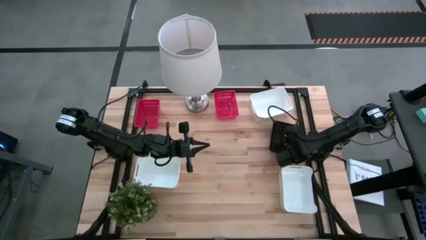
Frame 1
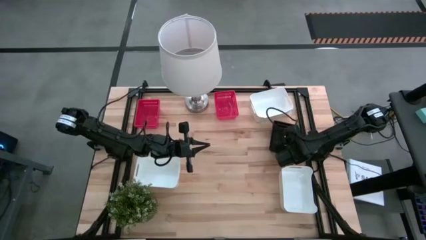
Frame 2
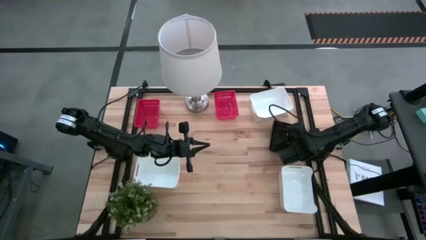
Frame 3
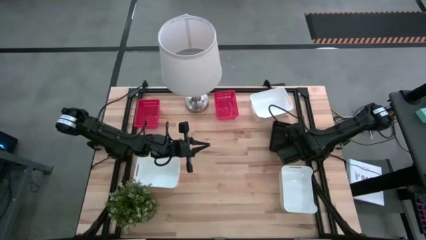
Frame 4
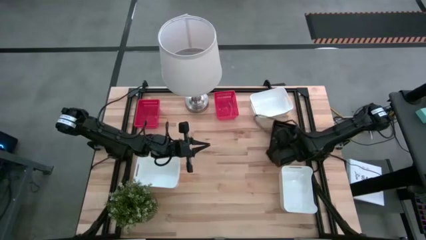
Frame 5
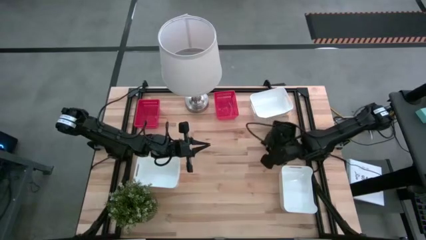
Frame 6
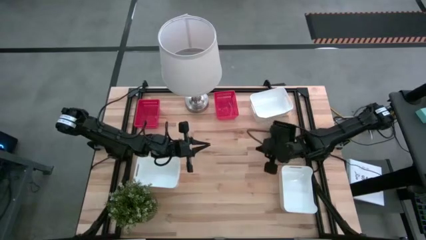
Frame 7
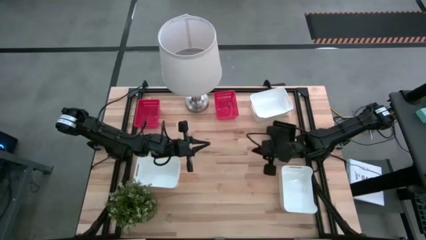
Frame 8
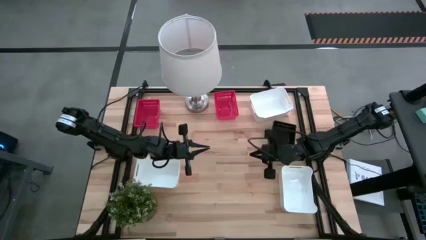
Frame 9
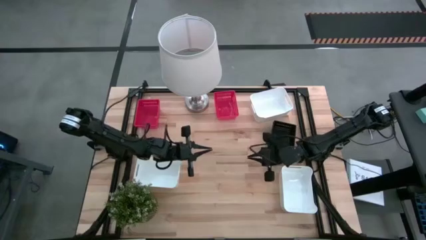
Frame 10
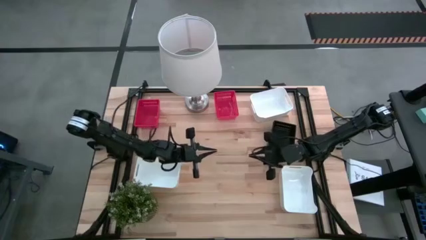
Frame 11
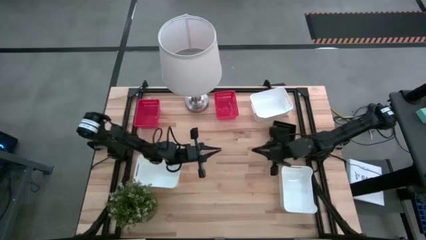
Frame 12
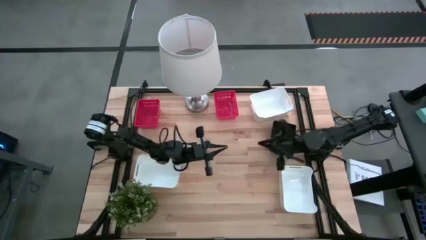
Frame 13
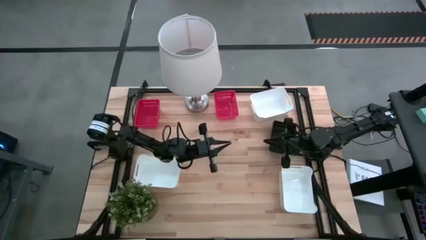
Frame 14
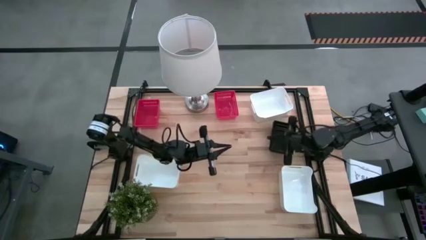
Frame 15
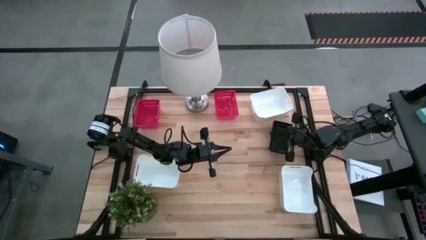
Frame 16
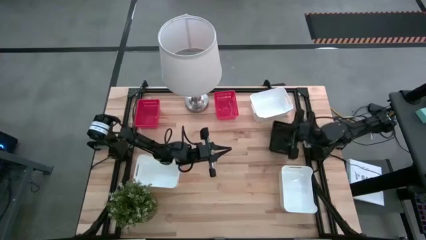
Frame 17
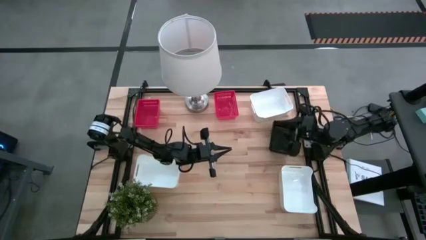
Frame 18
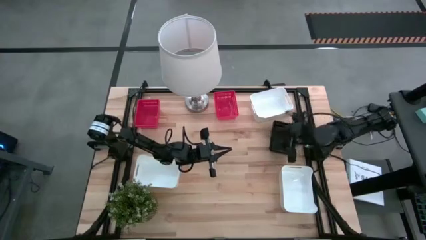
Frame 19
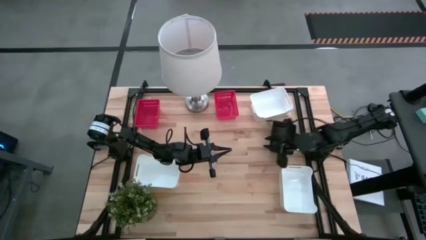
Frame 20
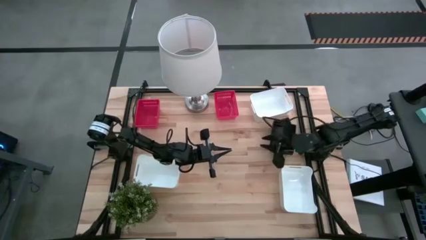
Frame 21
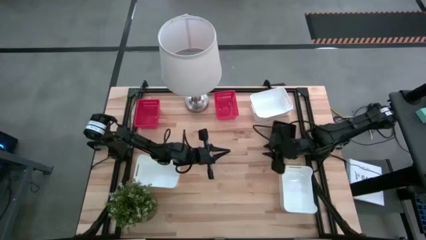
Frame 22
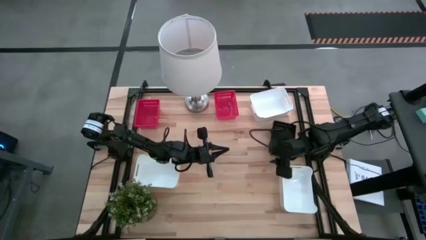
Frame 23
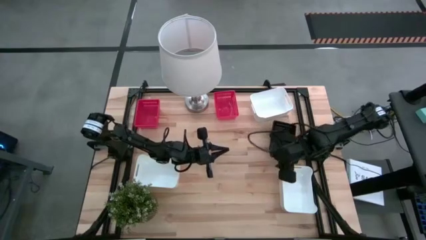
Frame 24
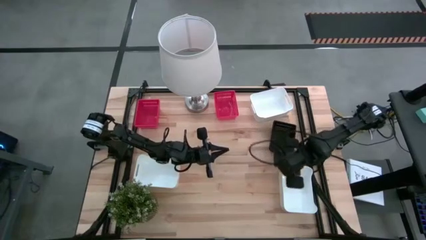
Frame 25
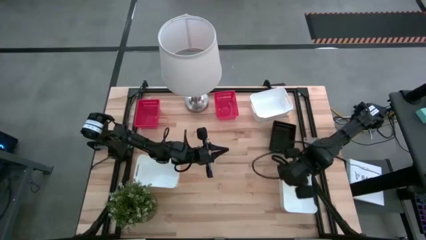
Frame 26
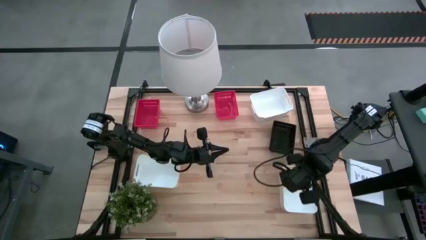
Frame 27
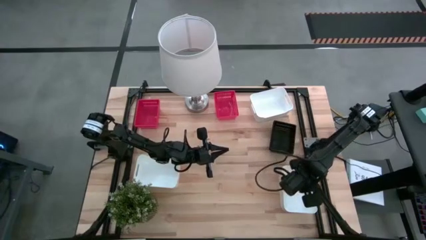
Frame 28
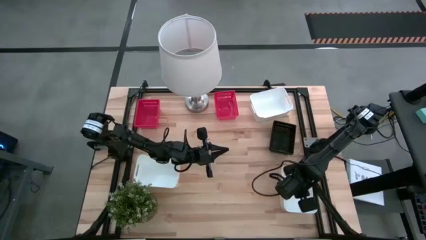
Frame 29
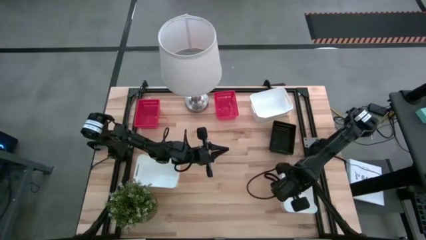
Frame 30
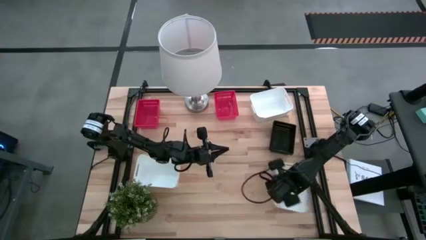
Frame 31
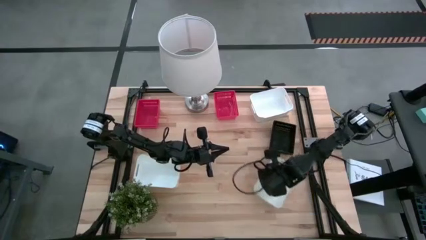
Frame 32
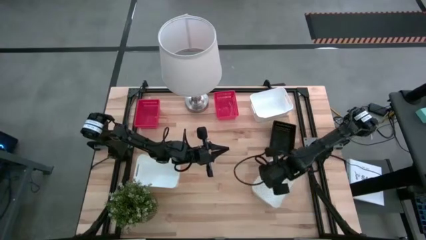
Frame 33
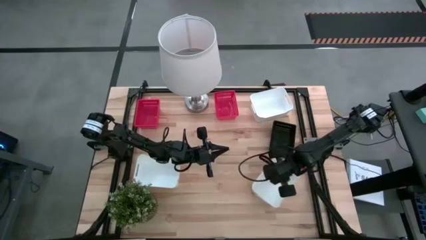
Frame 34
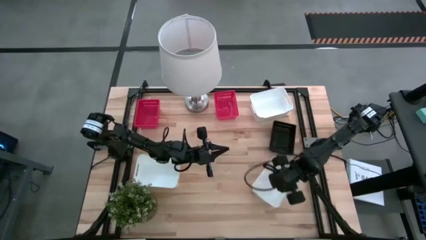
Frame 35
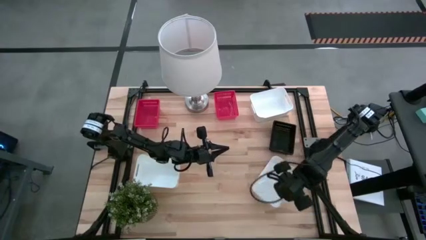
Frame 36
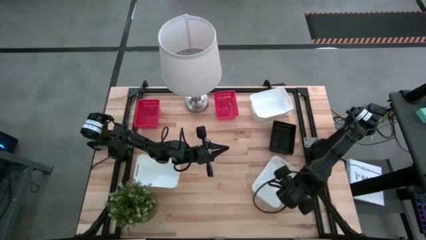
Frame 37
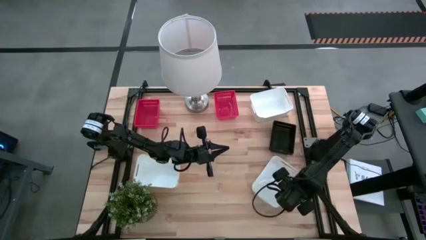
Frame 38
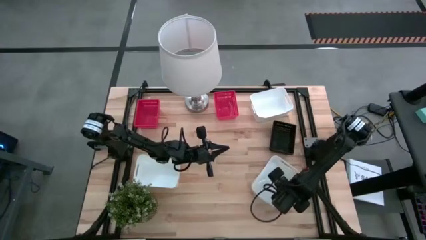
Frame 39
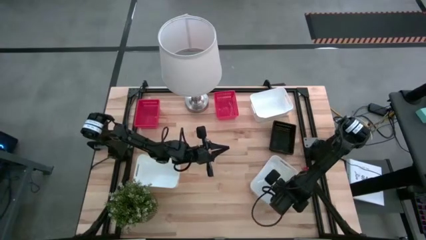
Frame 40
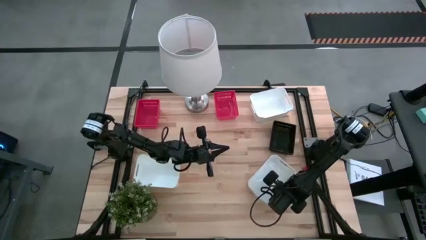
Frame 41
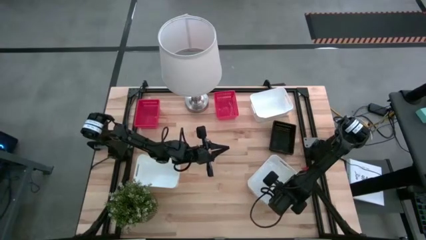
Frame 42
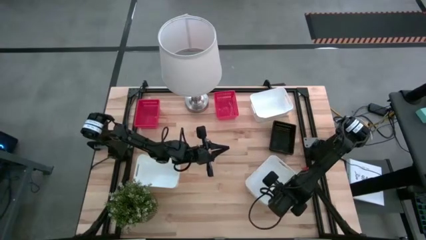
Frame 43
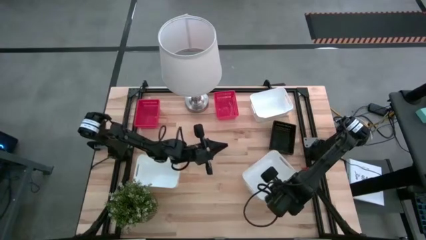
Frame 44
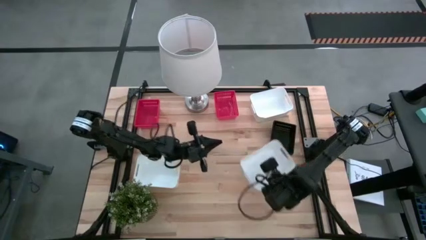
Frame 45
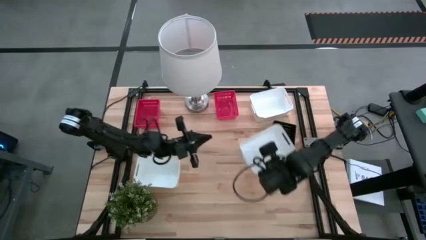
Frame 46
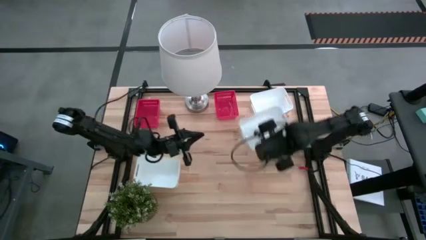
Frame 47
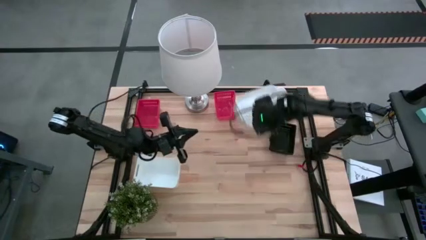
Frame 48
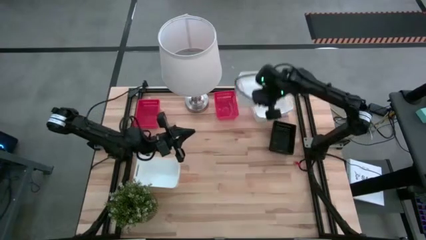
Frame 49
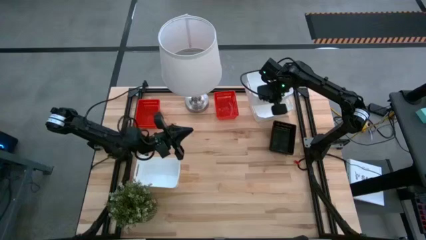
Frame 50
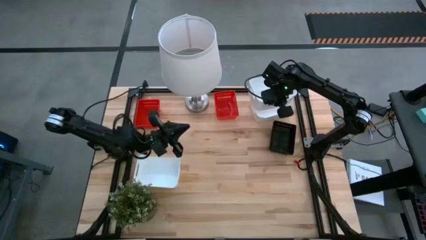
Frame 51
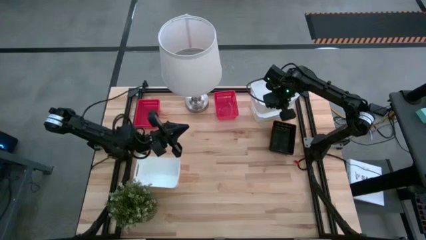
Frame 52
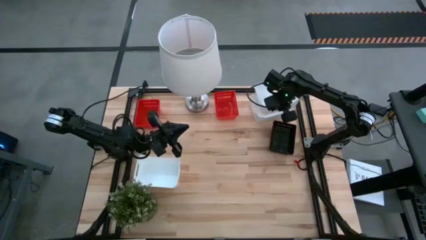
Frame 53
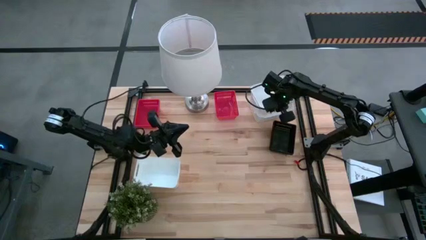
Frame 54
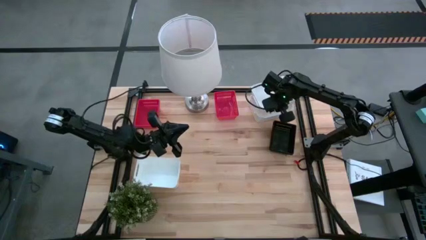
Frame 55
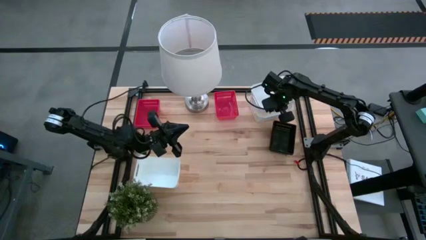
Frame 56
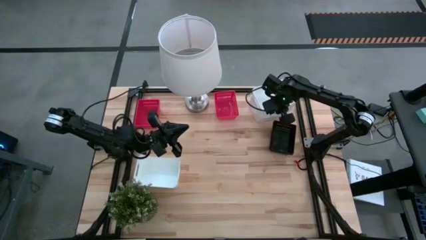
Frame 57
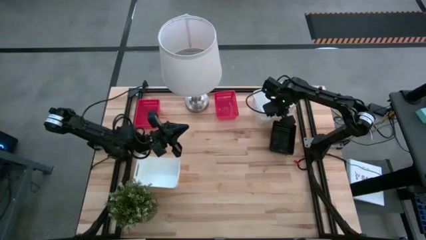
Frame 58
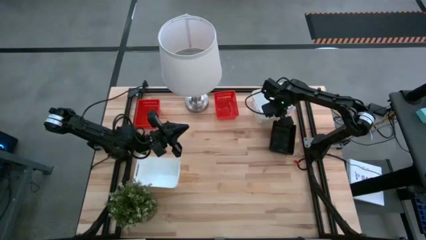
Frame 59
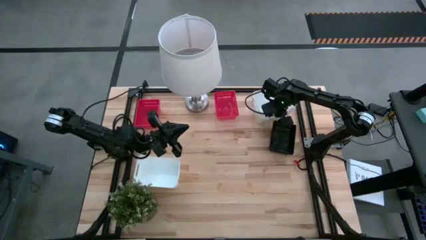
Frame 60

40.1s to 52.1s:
Stack the bottom right and white bin on top of the top white bin

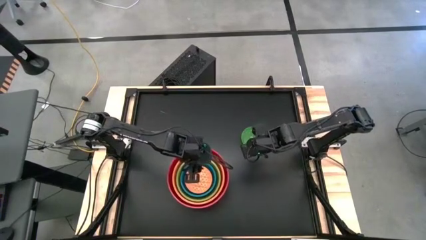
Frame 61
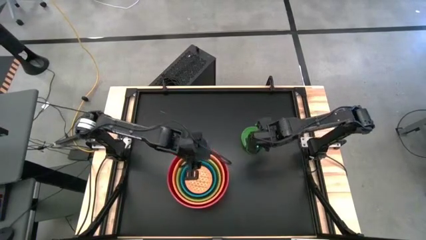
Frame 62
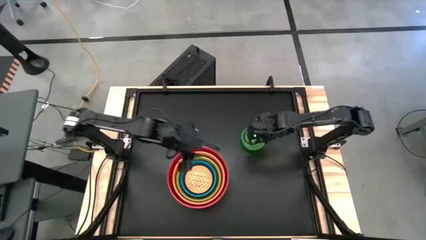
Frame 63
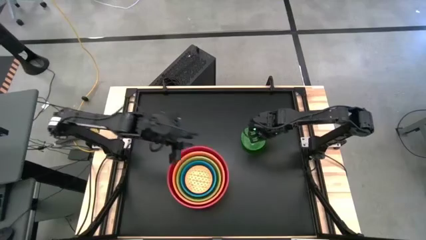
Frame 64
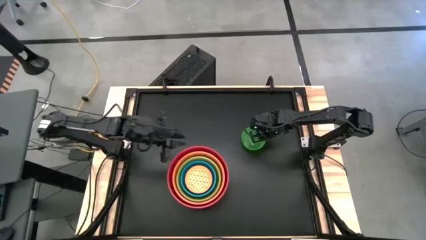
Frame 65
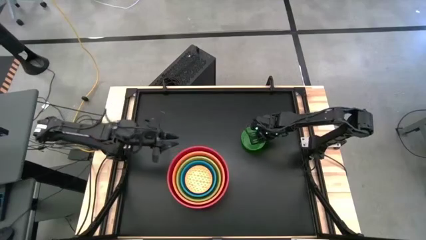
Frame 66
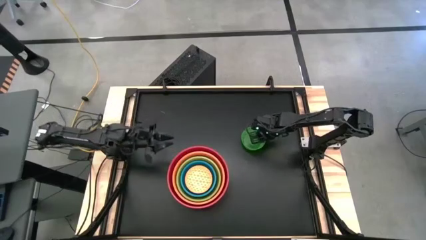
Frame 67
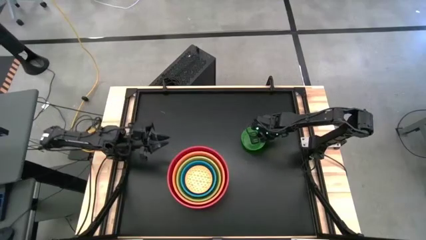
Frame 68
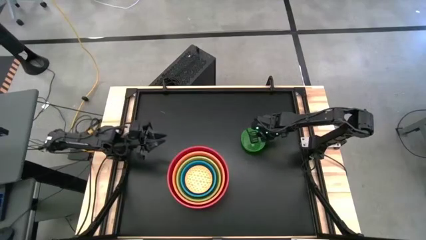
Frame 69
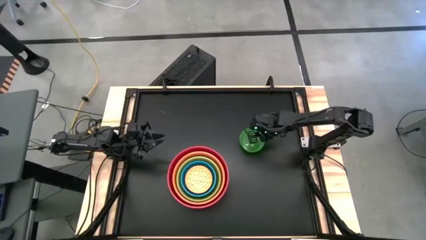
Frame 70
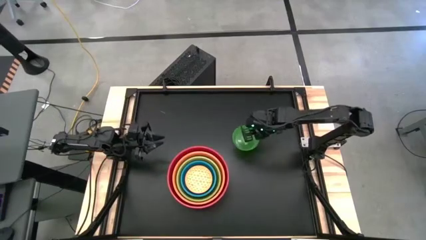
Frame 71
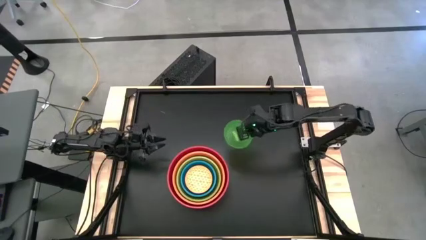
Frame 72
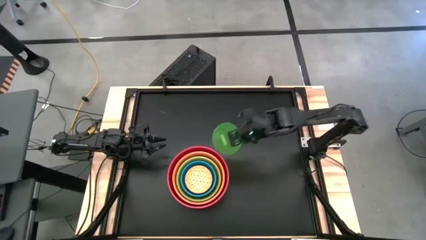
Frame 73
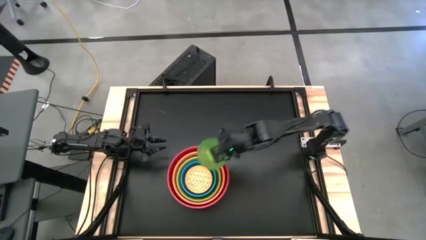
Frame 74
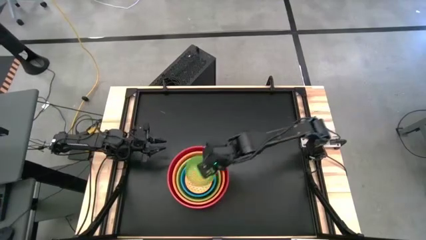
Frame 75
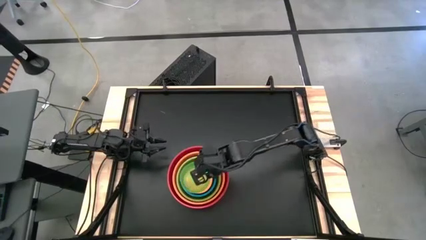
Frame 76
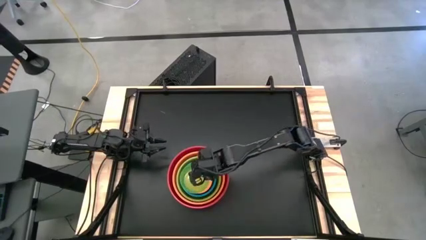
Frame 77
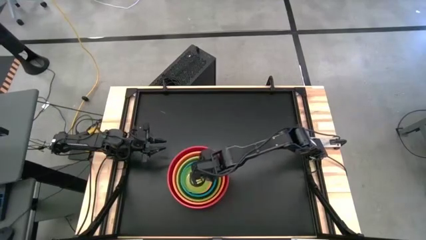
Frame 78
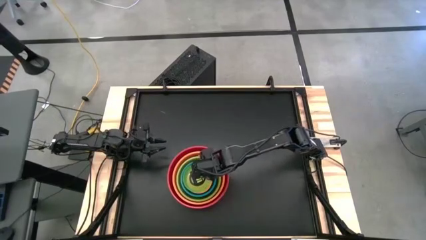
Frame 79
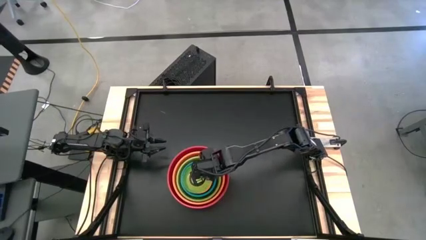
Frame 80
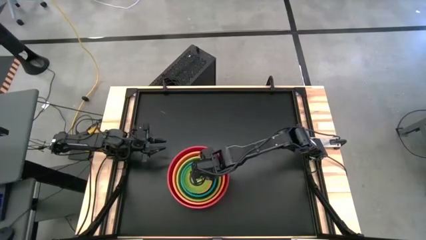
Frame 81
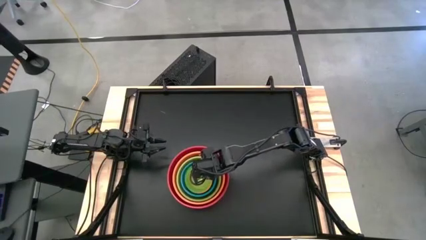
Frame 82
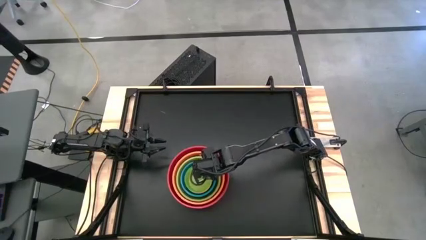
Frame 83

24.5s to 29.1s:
Stack the transparent green bowl on top of the orange patterned bowl
